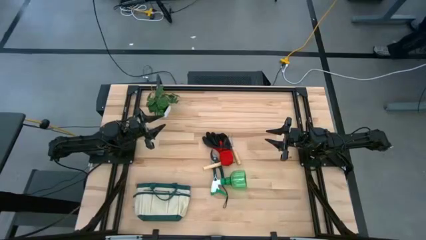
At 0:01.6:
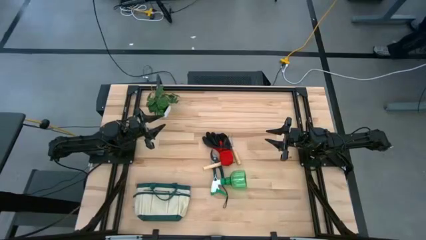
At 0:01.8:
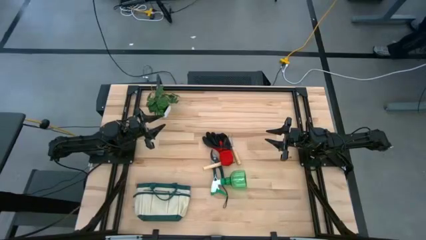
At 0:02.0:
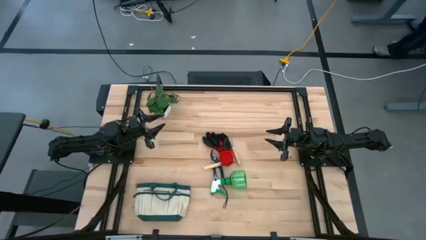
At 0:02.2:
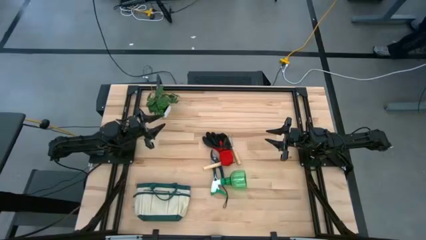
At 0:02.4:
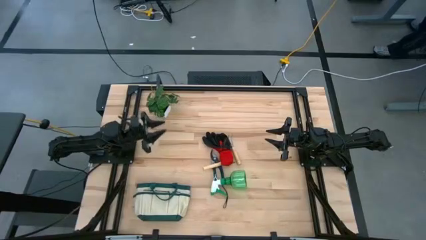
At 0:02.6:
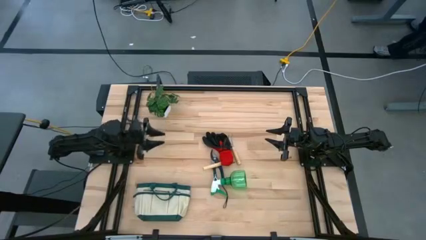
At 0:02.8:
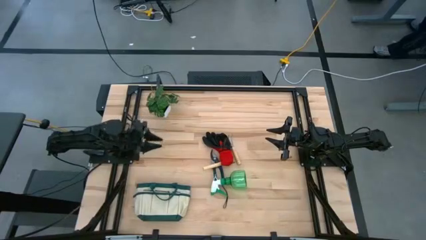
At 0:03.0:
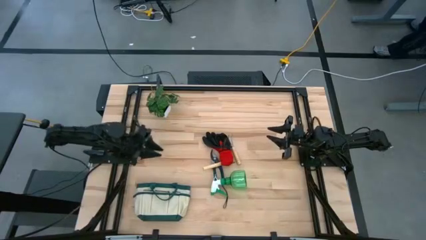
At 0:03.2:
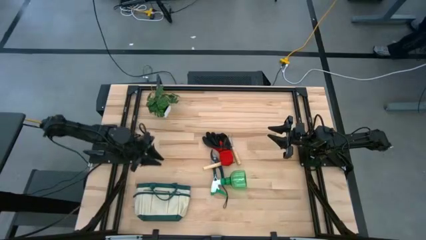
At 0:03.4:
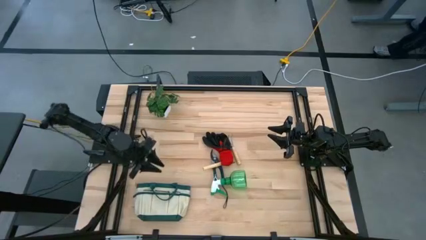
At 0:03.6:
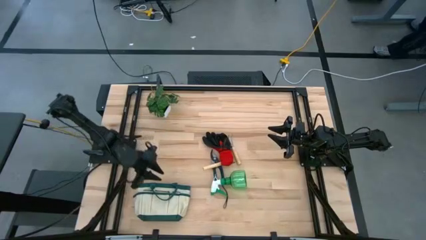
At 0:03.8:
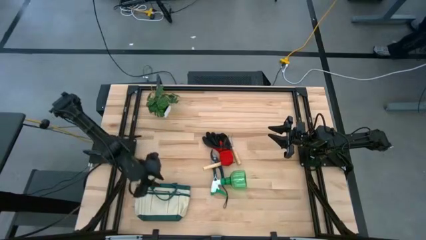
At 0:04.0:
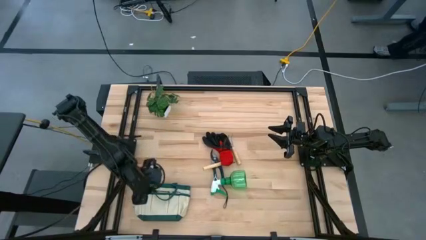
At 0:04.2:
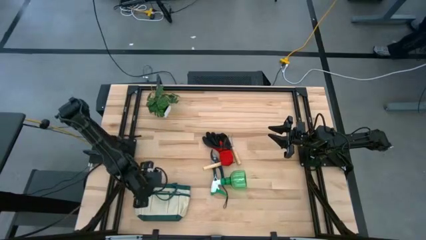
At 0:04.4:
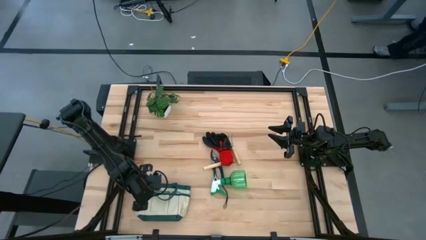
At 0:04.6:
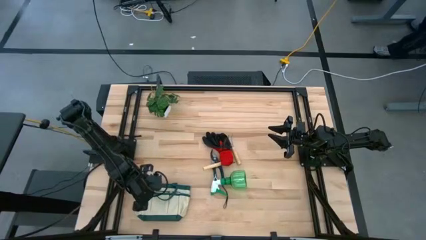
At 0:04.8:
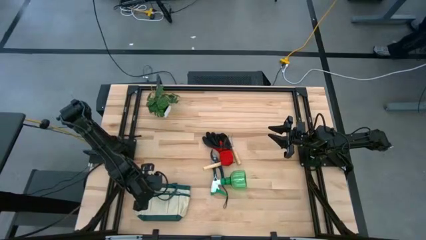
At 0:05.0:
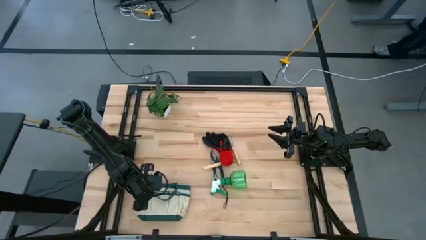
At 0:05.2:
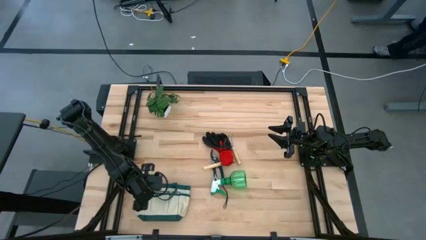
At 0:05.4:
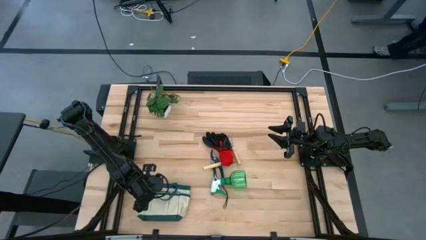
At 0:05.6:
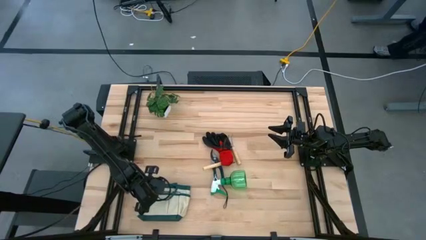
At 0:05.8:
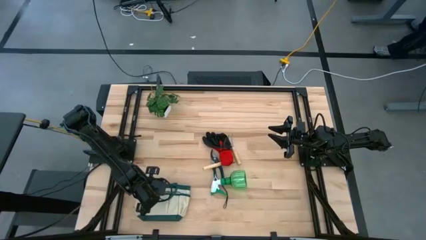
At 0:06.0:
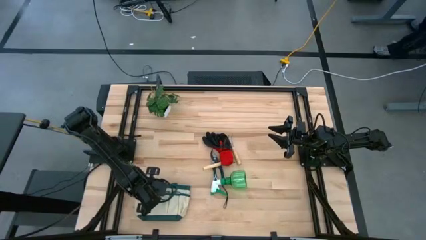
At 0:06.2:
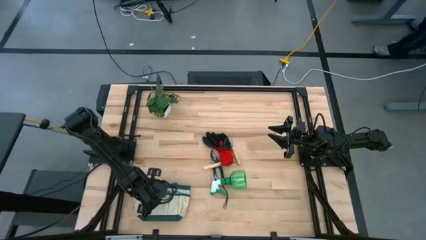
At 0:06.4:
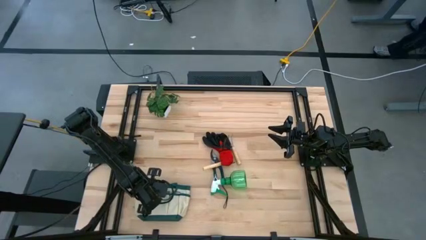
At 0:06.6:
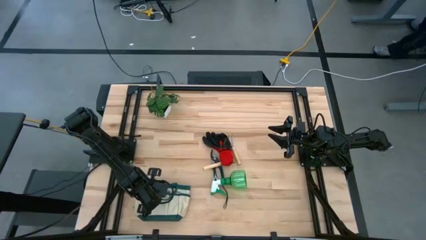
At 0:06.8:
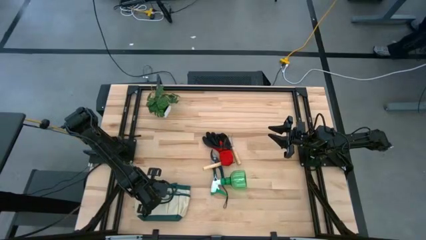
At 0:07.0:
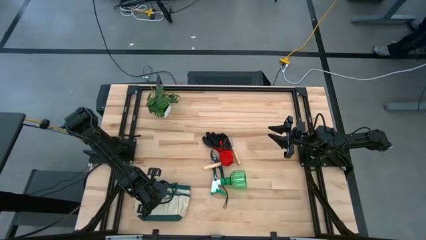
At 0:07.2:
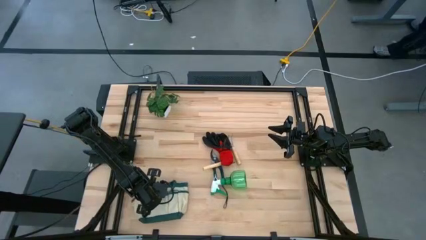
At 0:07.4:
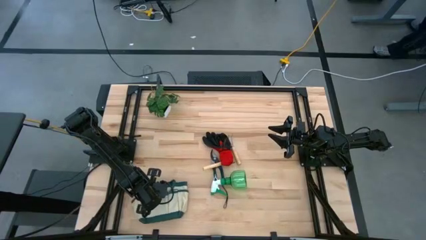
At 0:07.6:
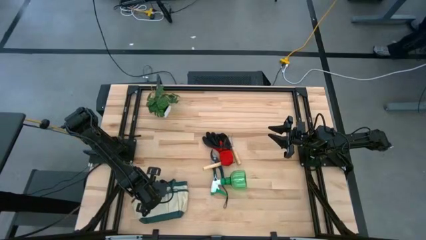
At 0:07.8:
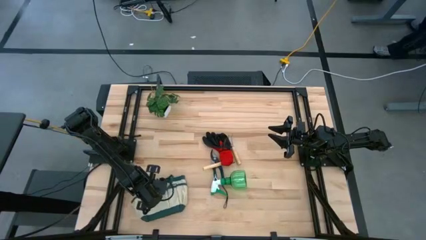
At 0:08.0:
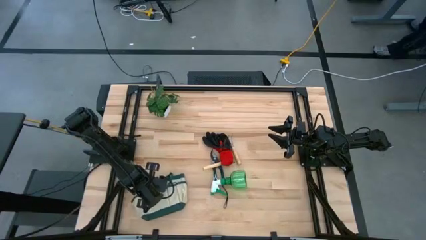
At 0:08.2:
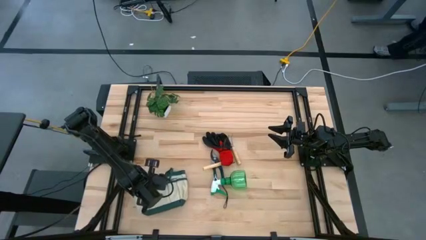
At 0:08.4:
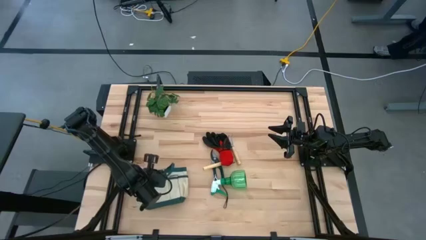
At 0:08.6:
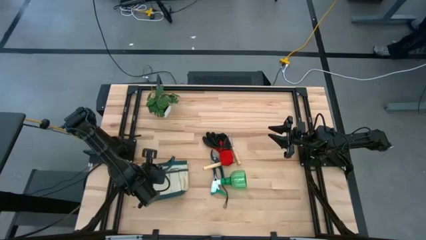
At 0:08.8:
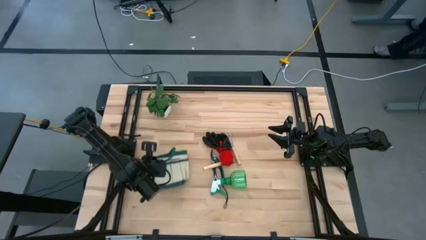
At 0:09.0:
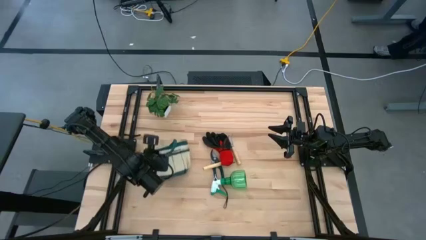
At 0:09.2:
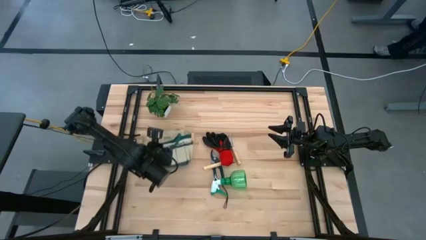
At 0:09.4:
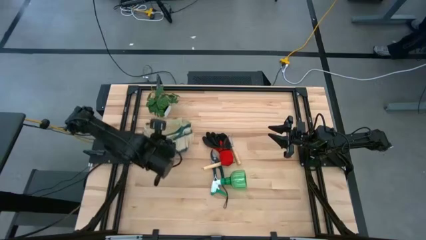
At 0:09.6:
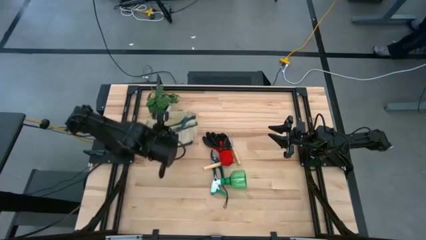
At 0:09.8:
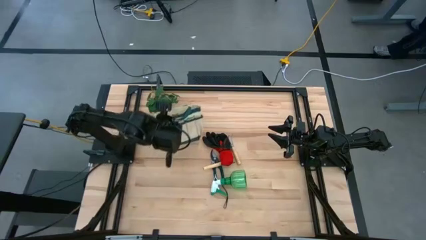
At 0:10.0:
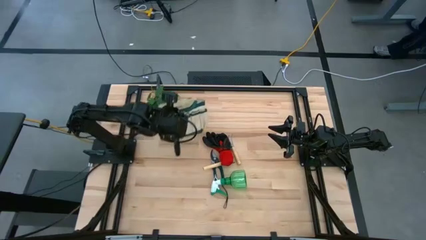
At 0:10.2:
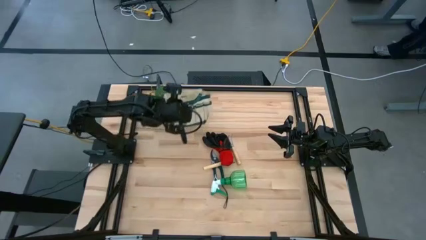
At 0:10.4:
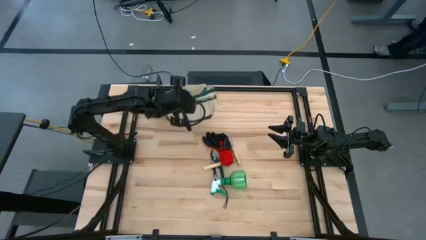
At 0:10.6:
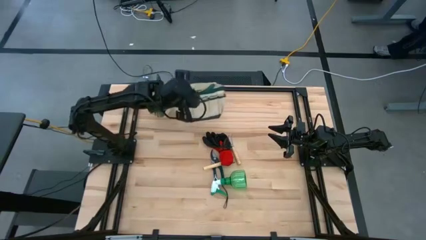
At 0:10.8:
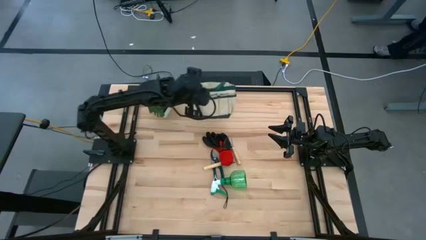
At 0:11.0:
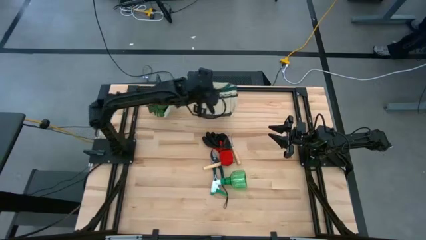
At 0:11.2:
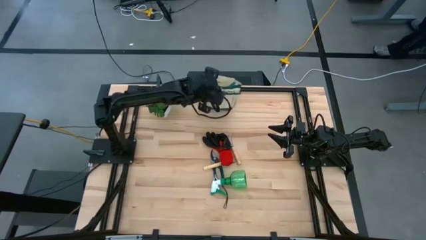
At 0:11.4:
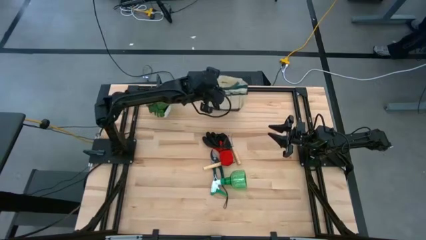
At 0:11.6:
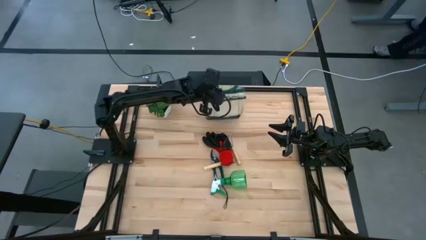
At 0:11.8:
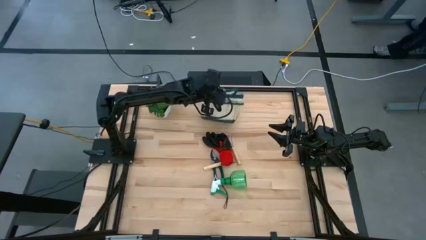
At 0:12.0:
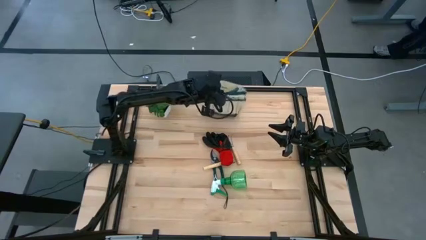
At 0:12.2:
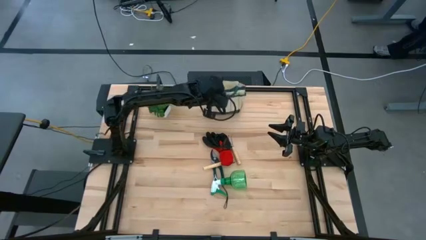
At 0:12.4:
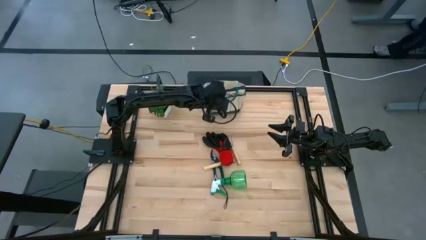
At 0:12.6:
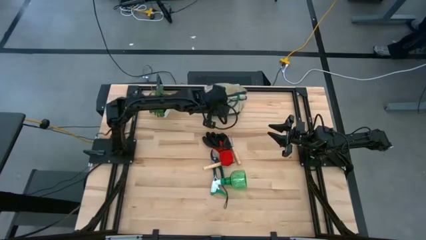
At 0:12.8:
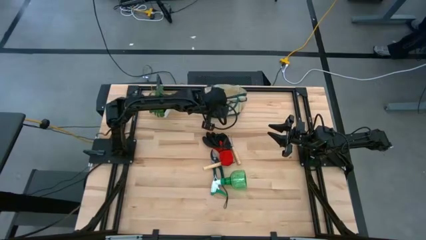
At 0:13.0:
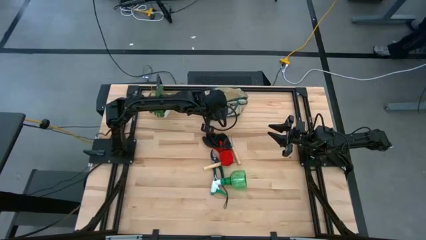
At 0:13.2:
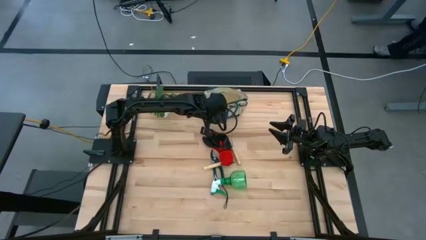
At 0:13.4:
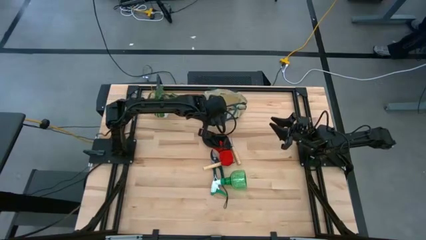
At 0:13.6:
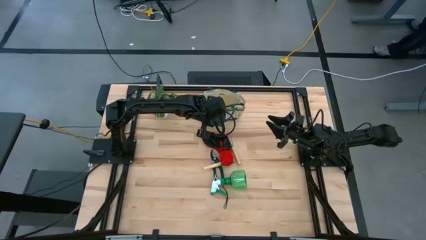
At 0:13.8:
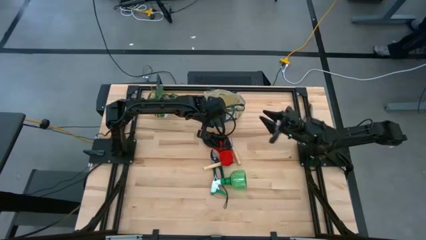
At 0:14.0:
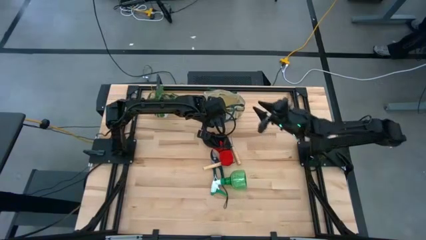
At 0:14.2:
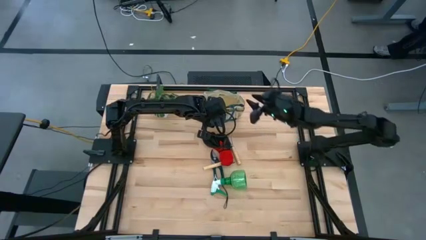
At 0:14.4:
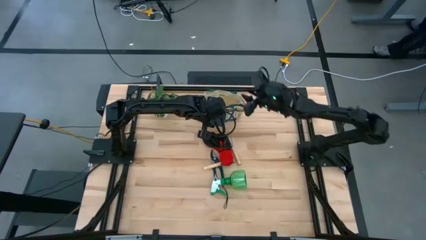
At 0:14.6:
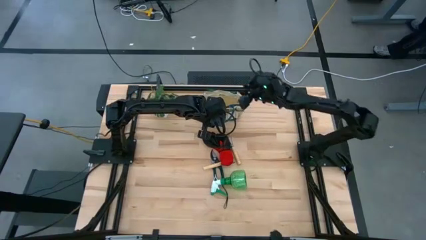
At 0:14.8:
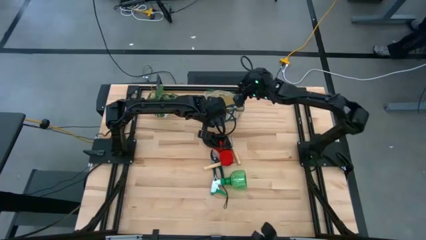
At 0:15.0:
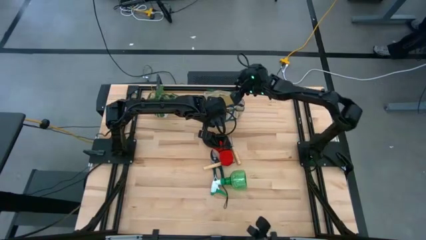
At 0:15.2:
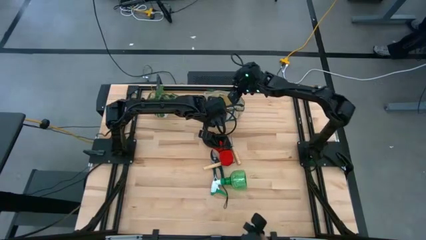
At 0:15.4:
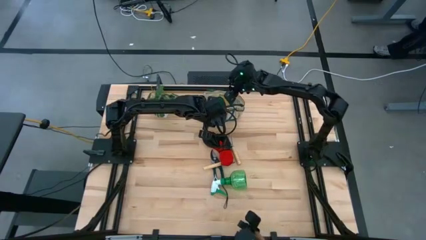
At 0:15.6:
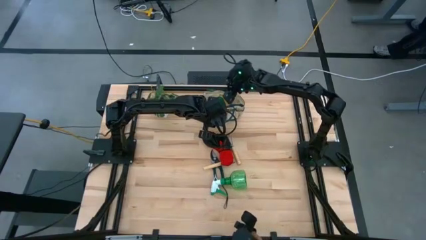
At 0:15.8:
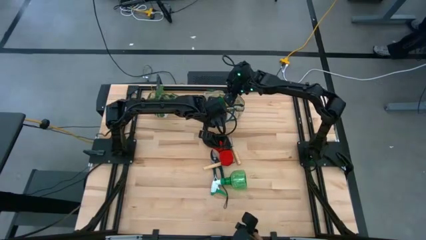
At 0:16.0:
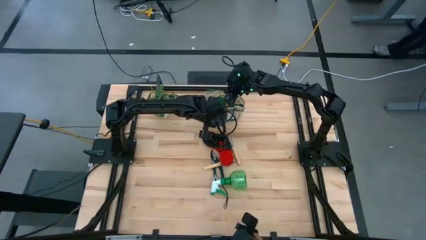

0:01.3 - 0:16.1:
Task: Pick & Place Garden tools in Gardening bag
Prepare the gardening bag
